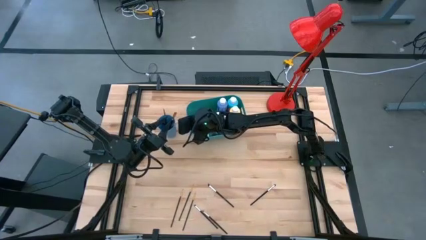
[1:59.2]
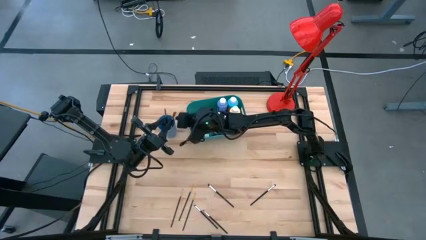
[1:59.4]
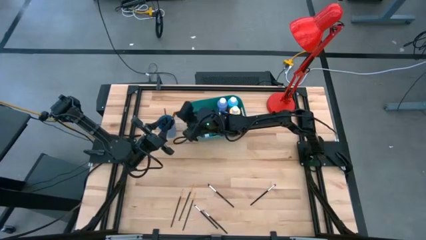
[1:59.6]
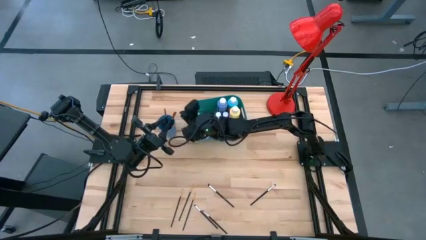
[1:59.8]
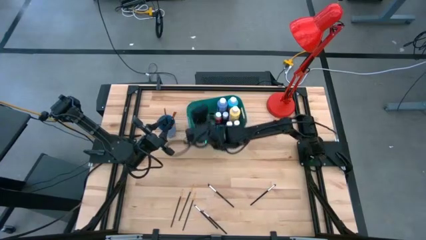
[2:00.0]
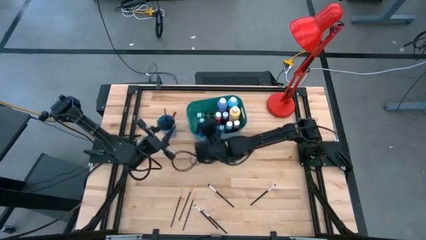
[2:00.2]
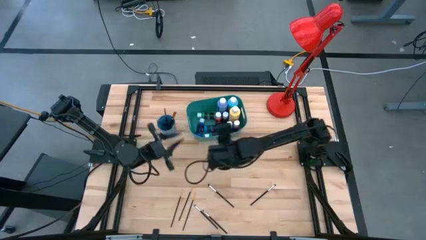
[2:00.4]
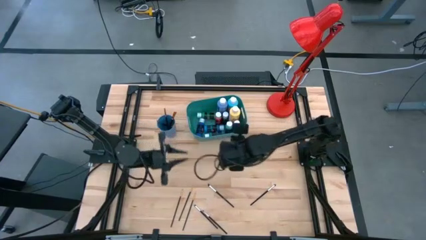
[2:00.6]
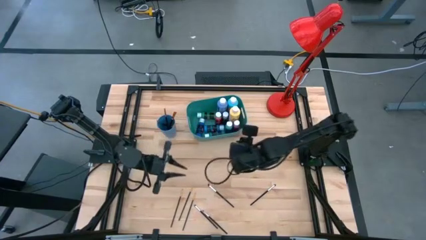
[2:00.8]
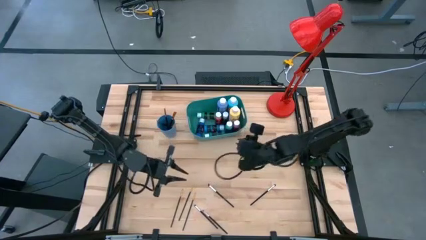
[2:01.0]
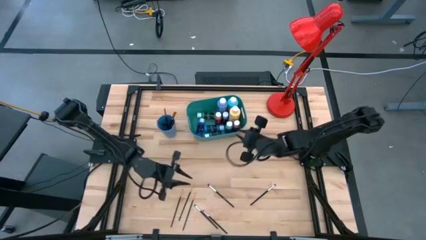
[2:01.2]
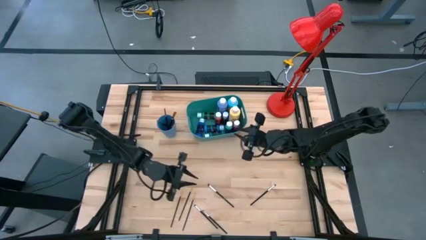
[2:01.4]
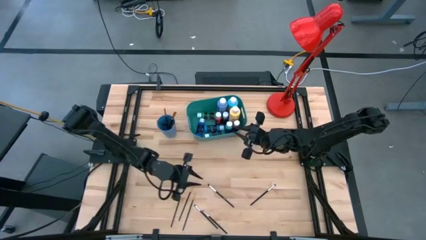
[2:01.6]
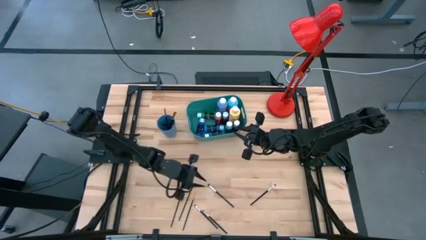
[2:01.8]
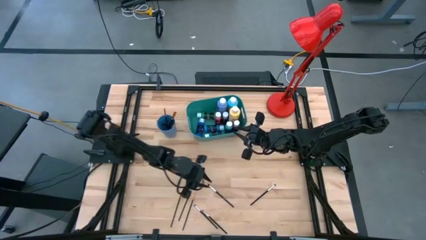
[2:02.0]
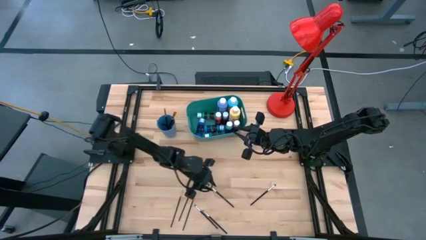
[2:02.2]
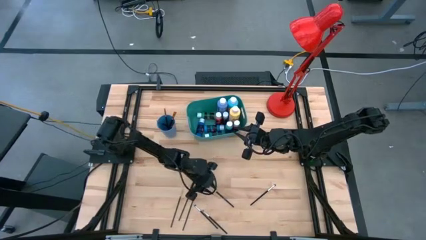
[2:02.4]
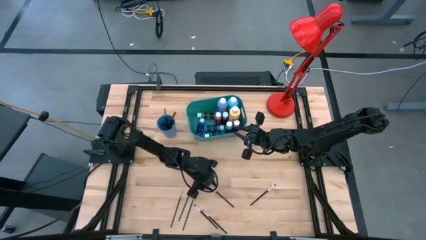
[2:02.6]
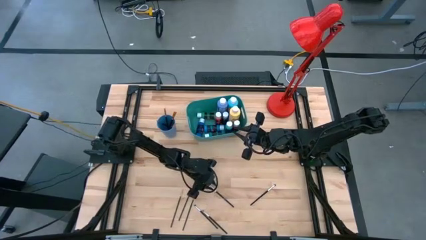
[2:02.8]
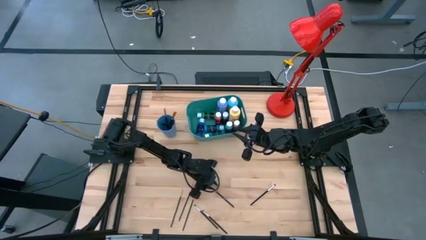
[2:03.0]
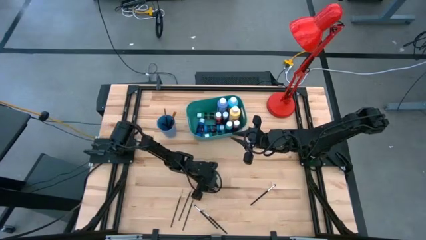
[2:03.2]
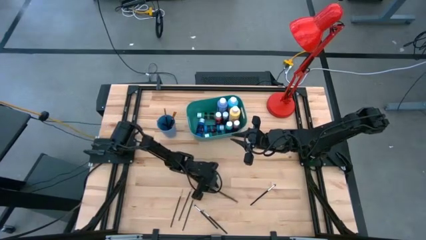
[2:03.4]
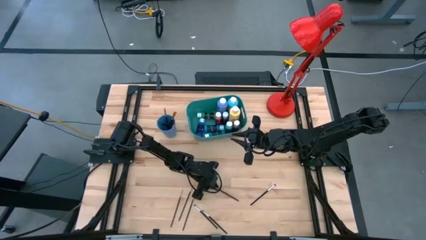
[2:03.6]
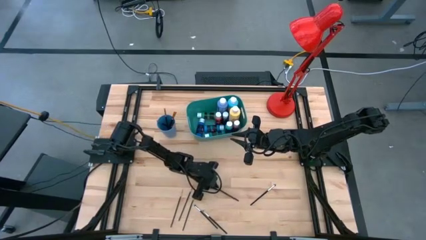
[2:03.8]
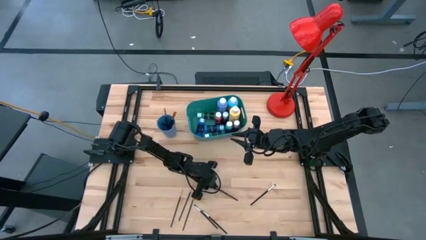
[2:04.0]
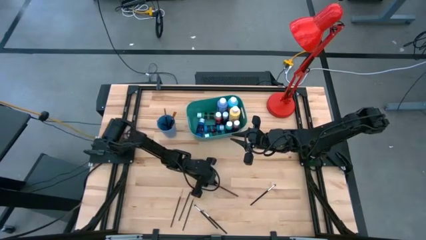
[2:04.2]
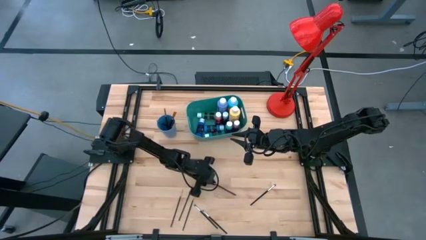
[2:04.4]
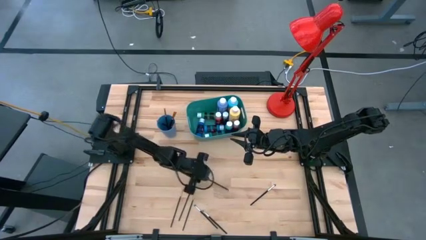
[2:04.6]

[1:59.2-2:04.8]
Task: Pick & Place Paint Supplies
Put the silver paint brush into the blue cup

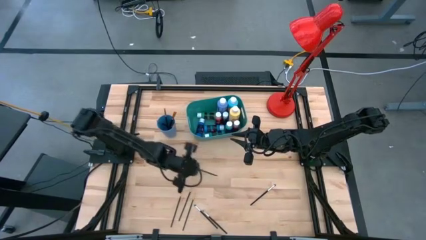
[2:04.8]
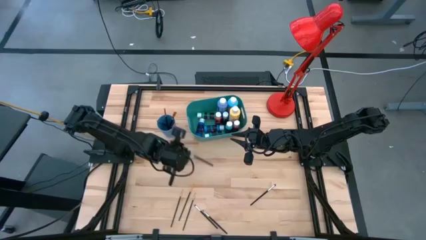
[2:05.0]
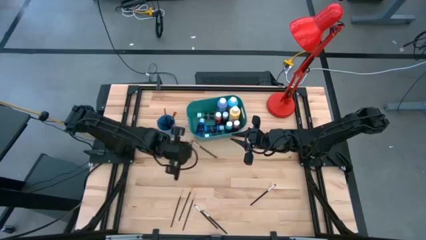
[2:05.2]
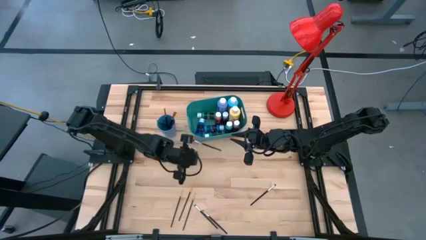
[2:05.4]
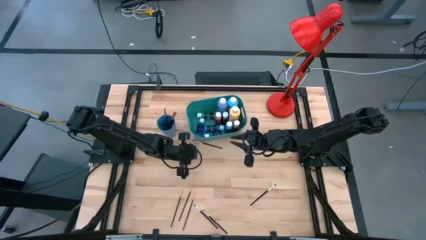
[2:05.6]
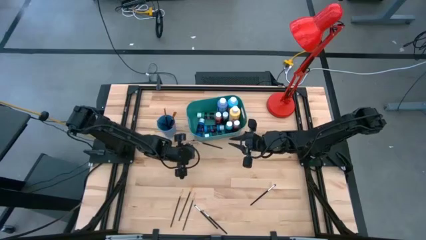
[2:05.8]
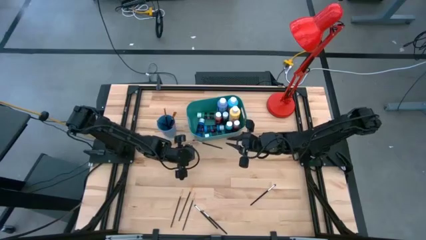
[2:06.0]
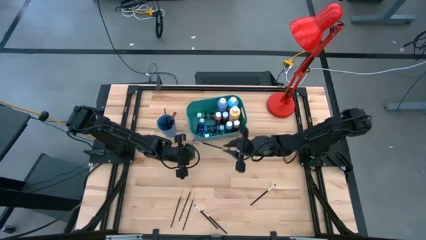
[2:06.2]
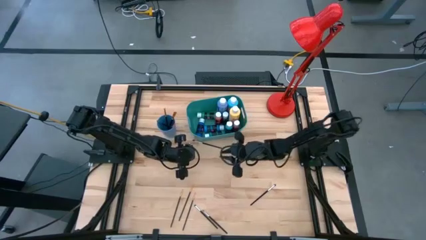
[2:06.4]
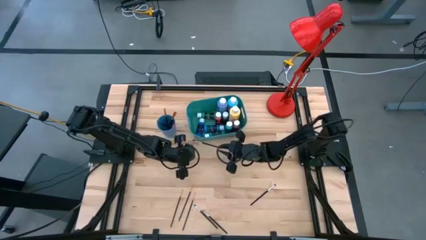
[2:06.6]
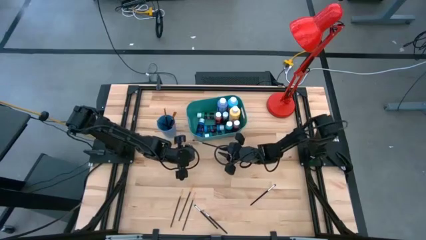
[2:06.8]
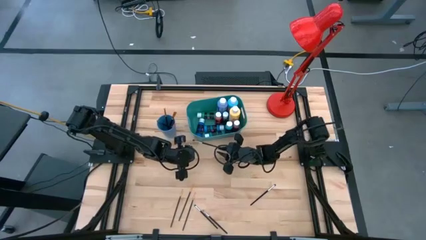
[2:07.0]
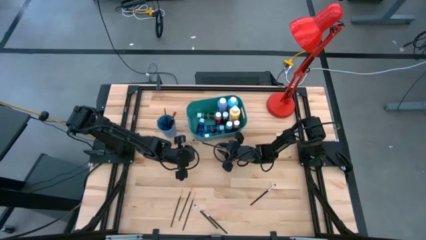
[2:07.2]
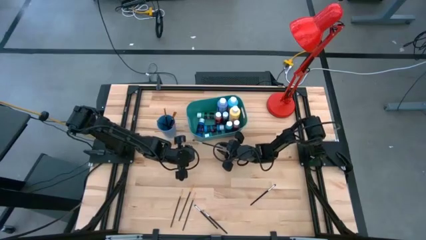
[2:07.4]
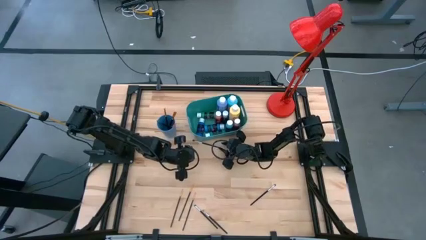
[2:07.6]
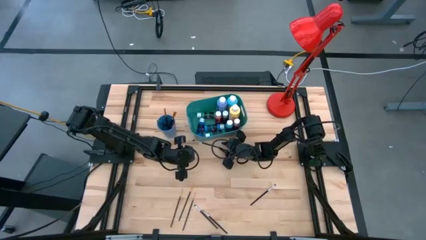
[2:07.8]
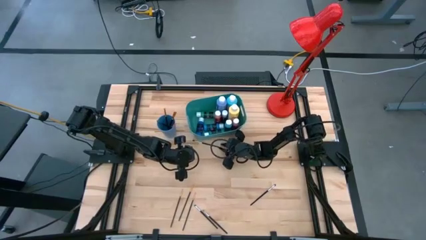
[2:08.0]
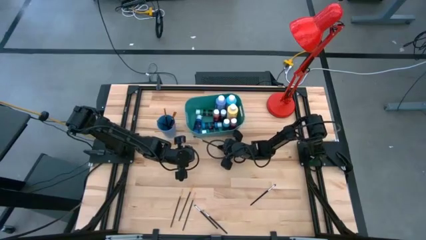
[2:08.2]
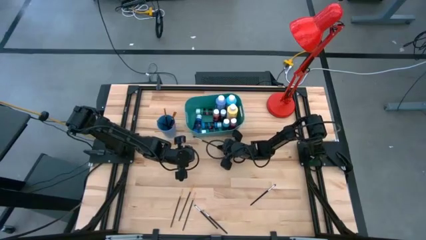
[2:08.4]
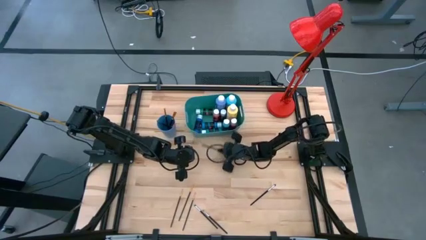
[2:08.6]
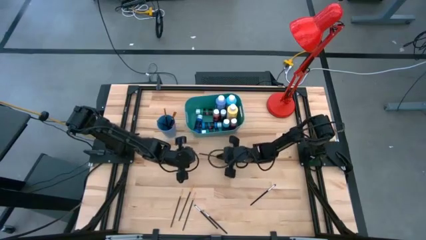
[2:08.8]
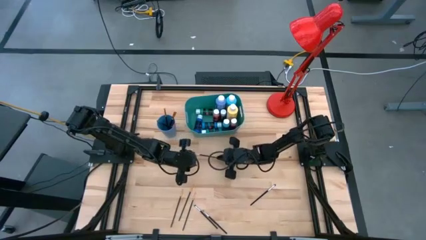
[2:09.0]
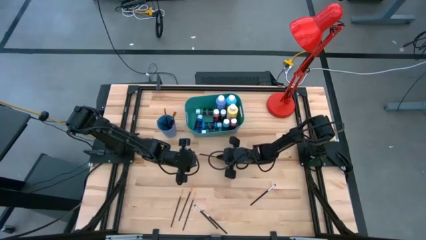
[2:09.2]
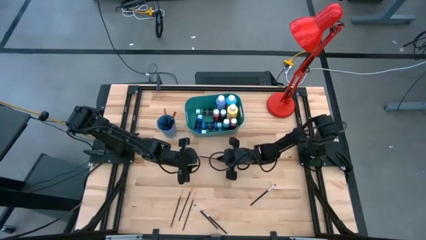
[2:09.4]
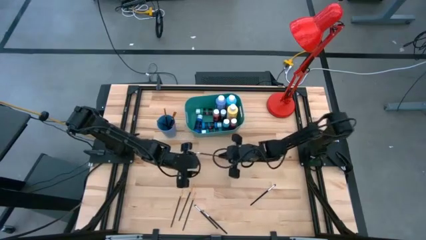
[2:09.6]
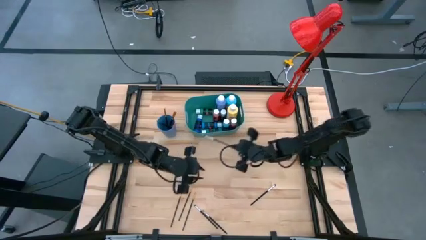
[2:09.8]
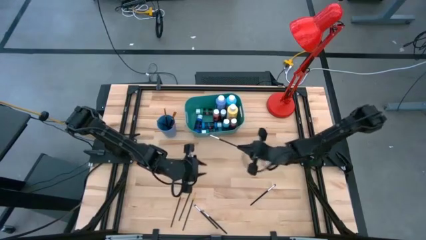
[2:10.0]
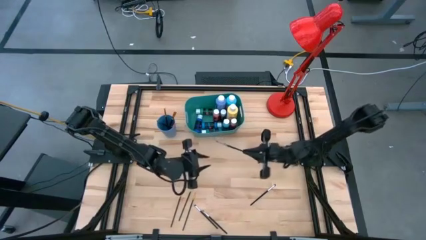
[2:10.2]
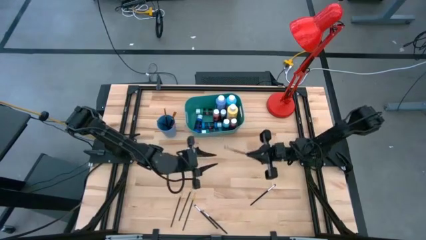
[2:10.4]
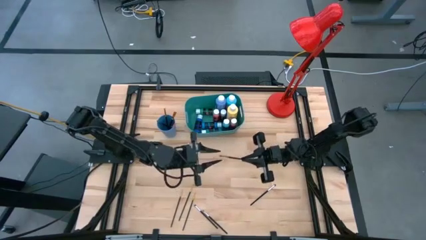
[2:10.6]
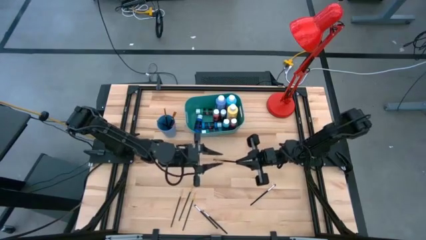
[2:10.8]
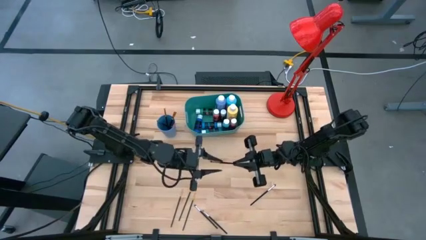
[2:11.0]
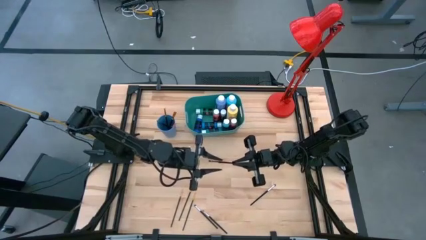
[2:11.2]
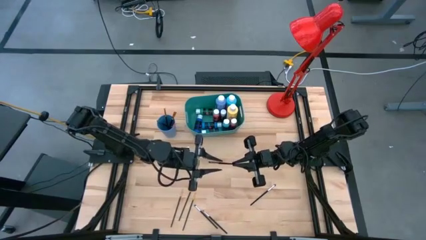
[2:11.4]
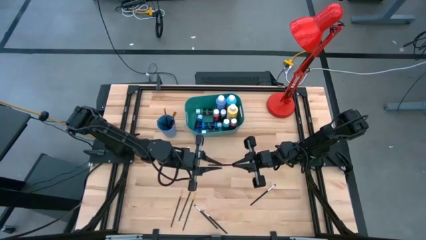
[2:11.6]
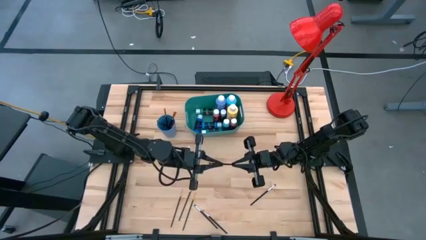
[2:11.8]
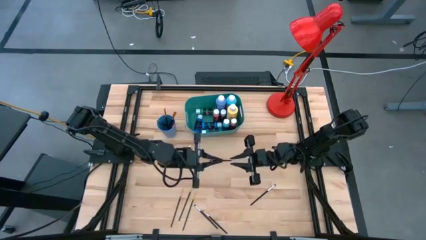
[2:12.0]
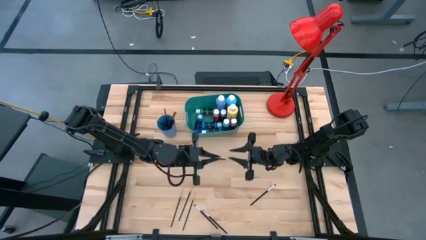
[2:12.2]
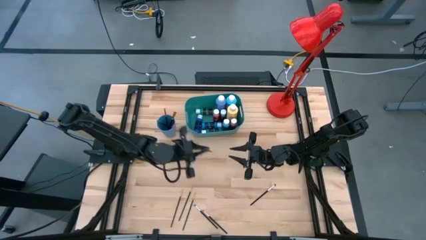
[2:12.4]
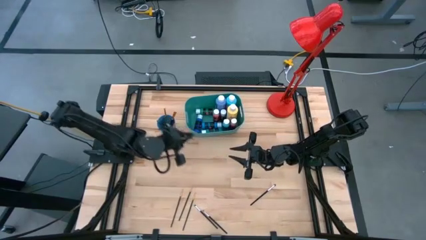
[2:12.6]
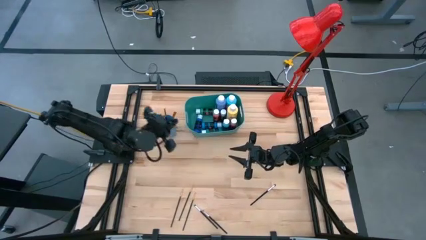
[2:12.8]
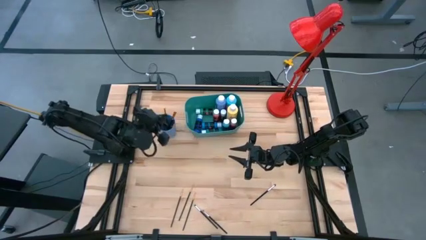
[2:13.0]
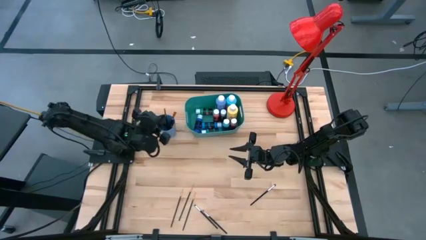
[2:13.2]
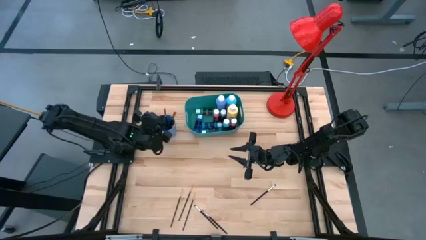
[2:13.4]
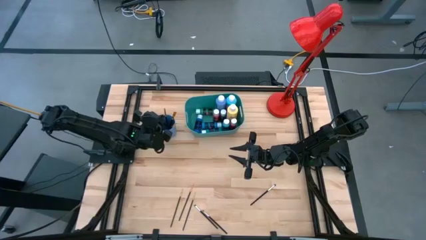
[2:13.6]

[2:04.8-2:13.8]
Put the silver paint brush into the blue cup

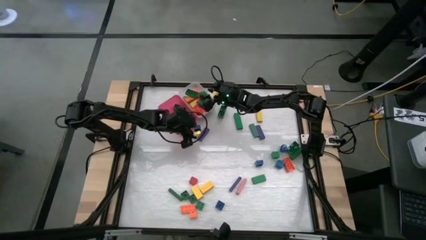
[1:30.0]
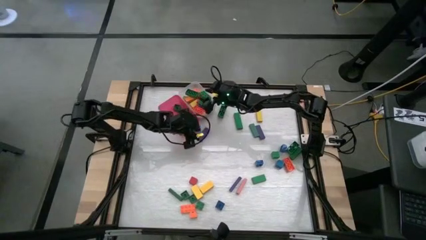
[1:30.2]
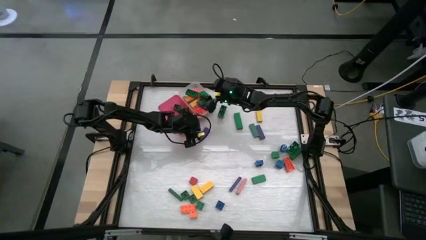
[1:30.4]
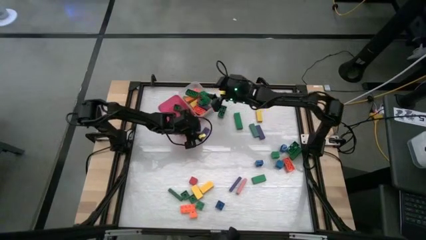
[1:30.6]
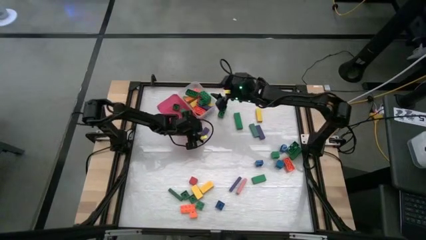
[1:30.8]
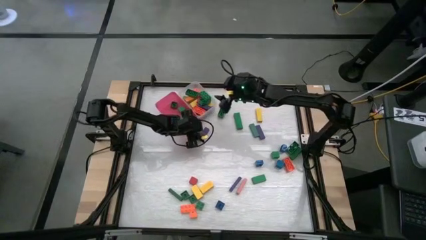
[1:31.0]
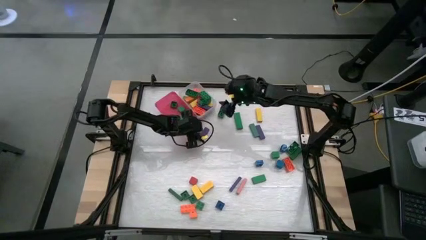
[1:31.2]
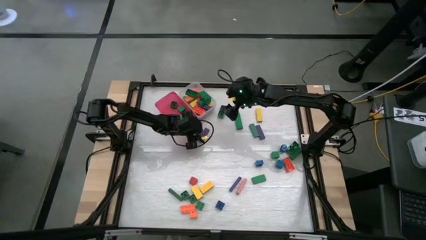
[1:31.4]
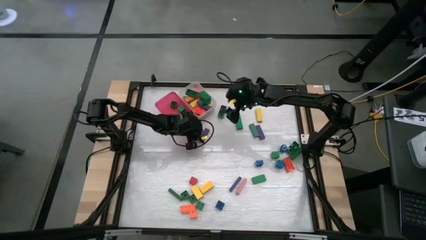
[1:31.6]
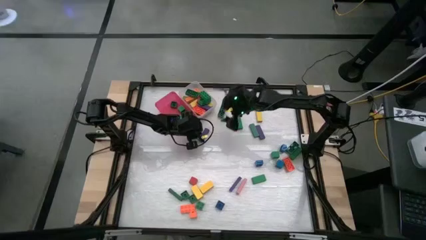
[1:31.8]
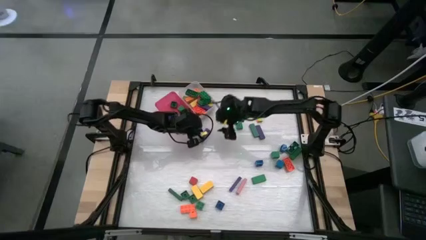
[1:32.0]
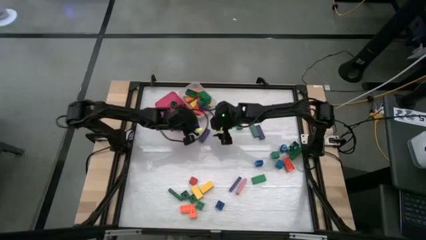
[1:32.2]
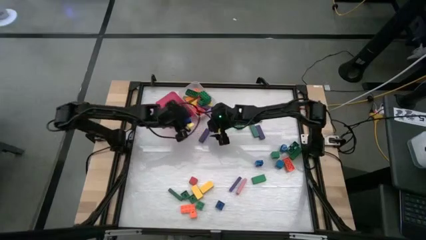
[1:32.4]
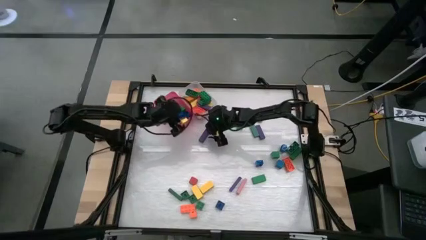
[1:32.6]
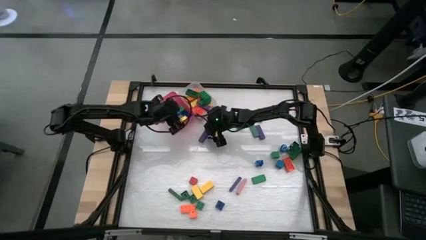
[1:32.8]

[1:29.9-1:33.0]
Task: Sort blocks by size
Put the small blue game piece into the pink bin
